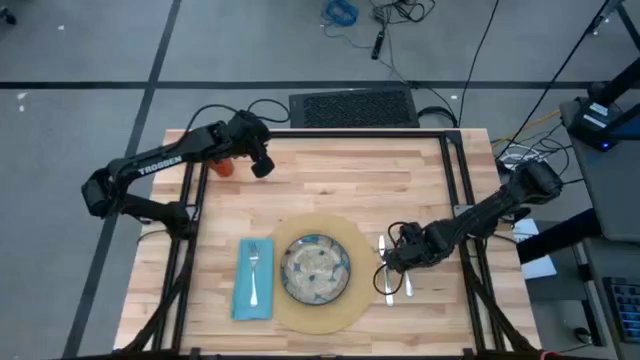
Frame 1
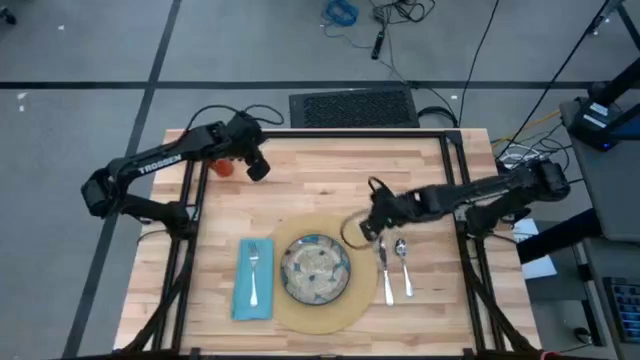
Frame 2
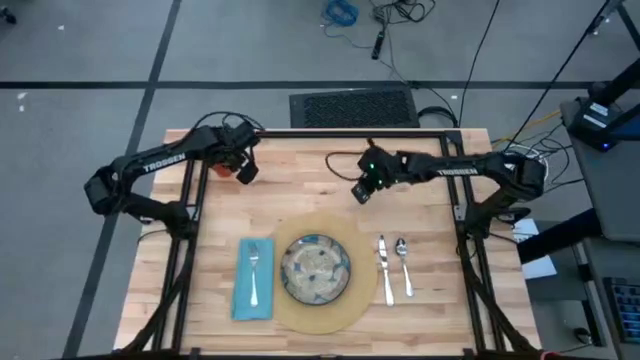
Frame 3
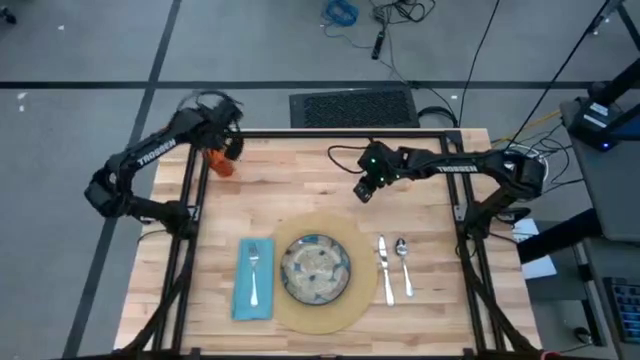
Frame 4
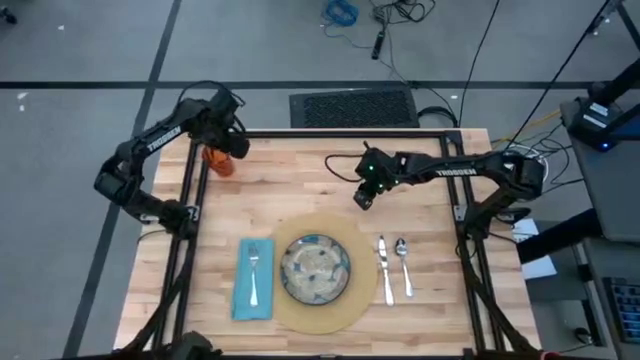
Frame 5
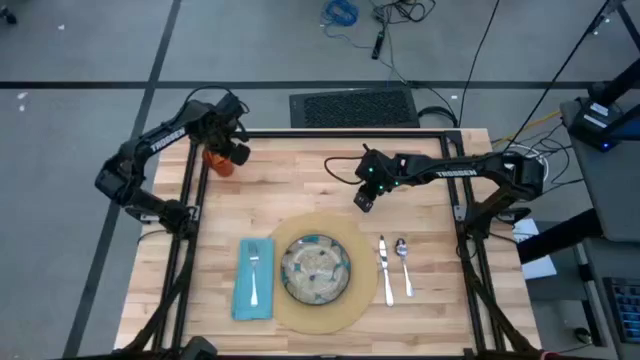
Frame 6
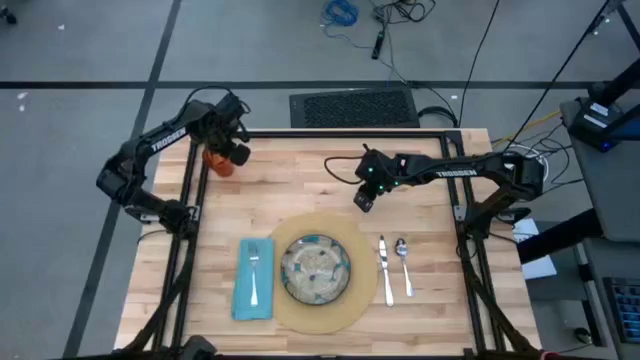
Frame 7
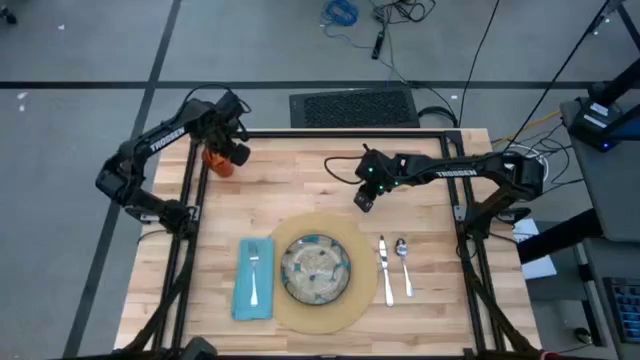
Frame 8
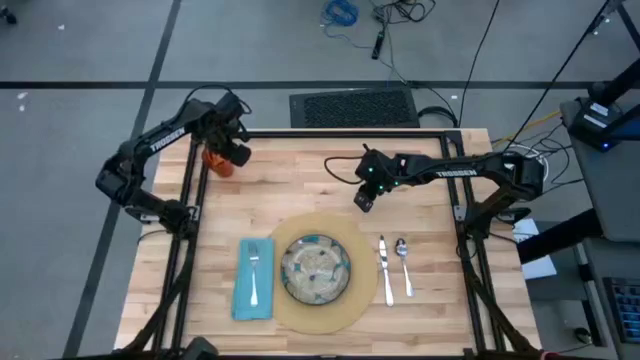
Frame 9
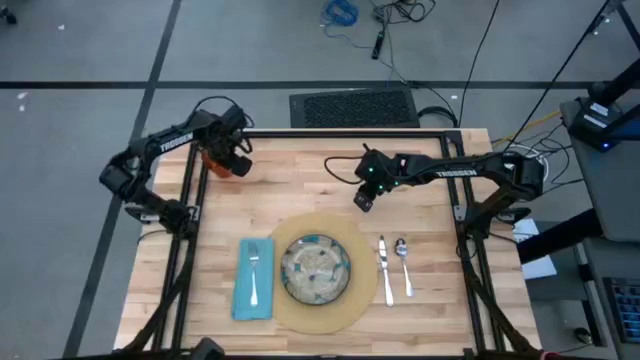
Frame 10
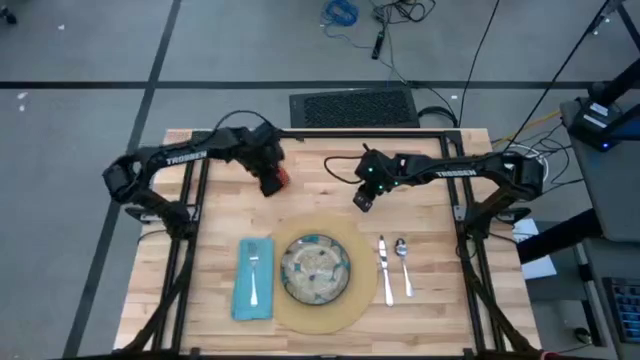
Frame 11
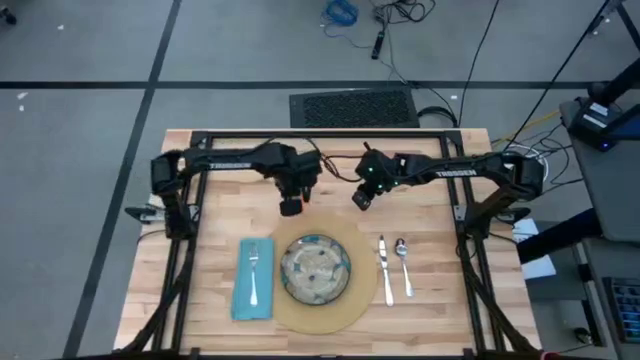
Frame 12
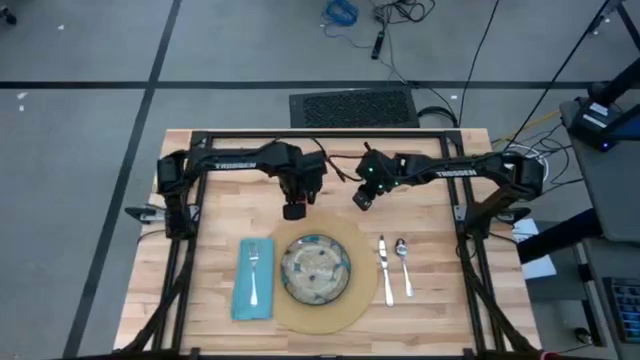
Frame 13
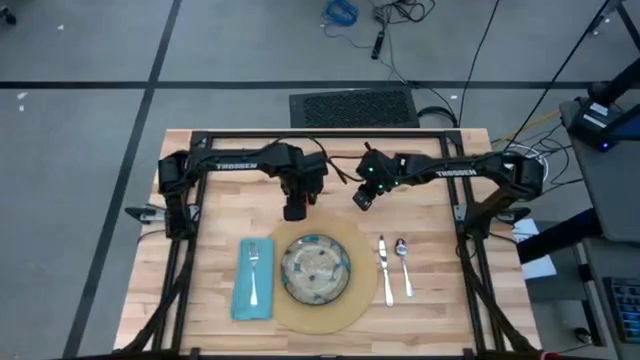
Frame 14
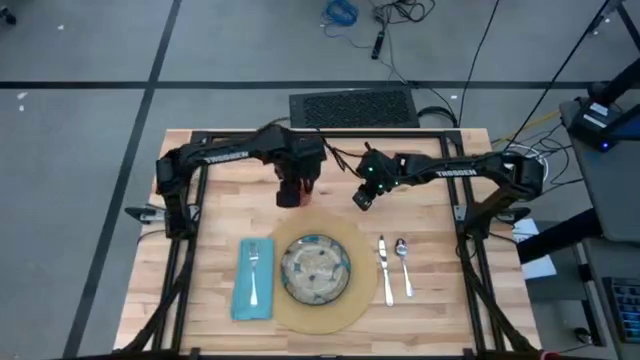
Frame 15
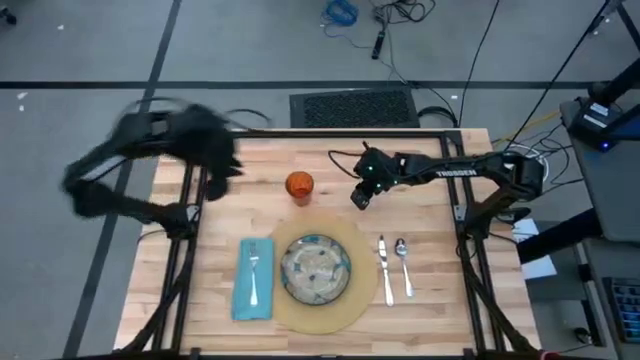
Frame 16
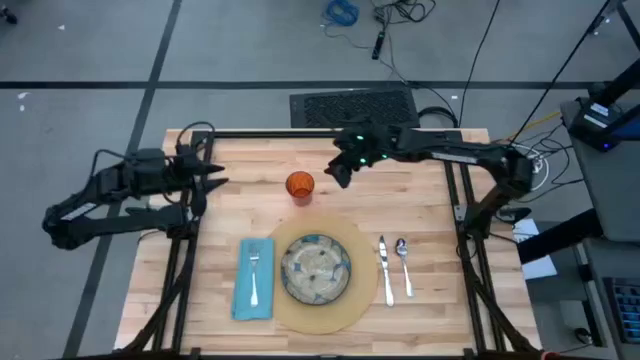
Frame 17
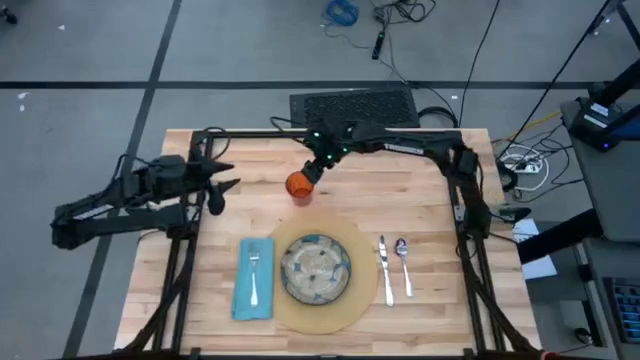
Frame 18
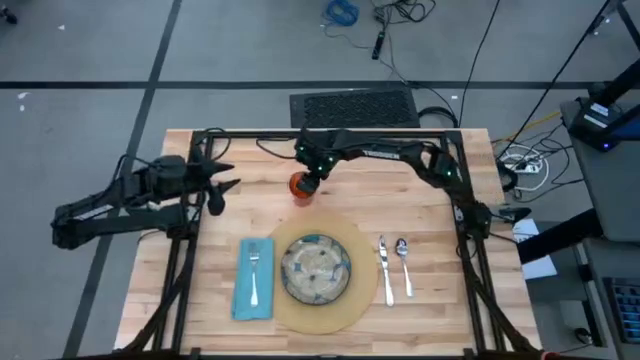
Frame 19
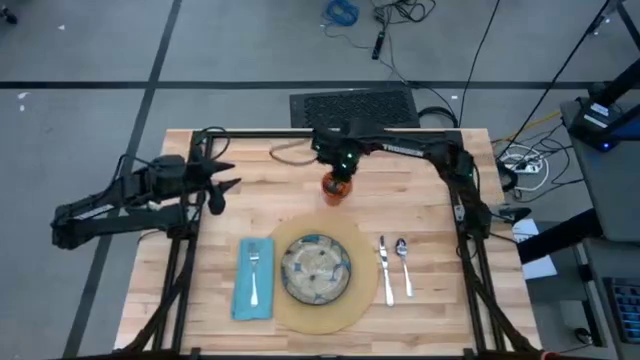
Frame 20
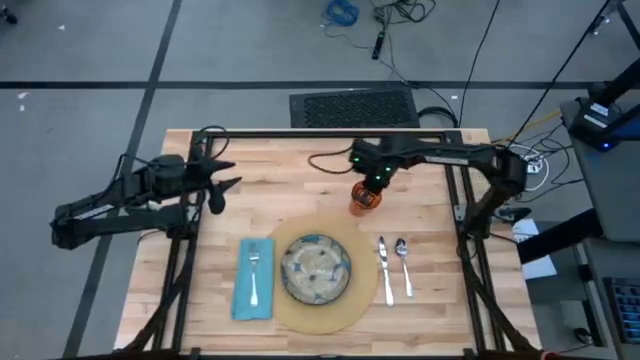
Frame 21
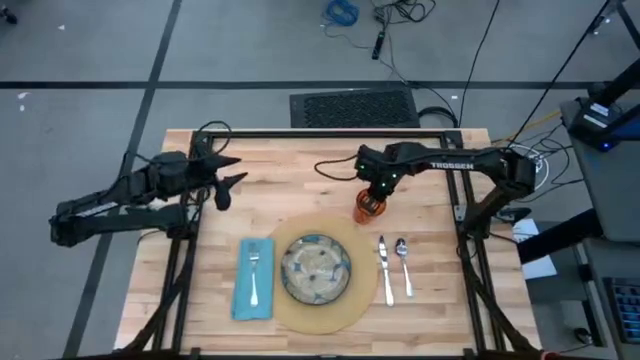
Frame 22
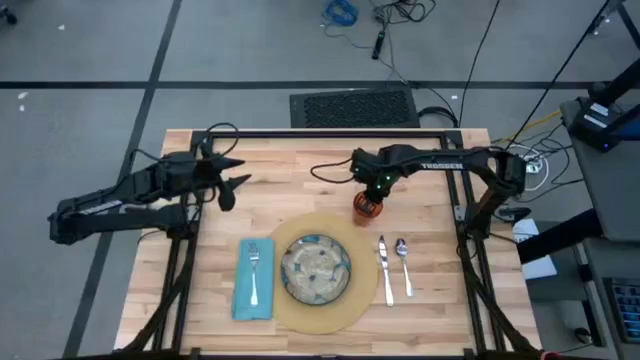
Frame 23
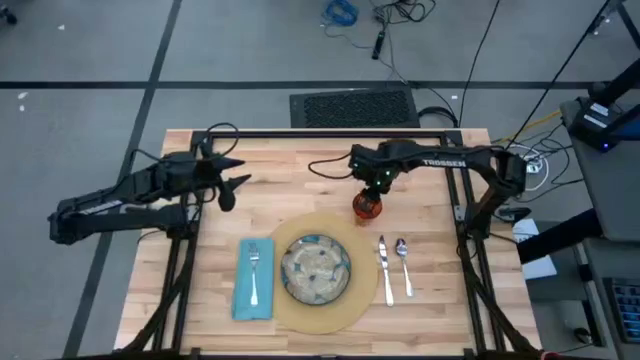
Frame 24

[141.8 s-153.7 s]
Task: Set table place
Put the orange cup on top of the table above the brown mat

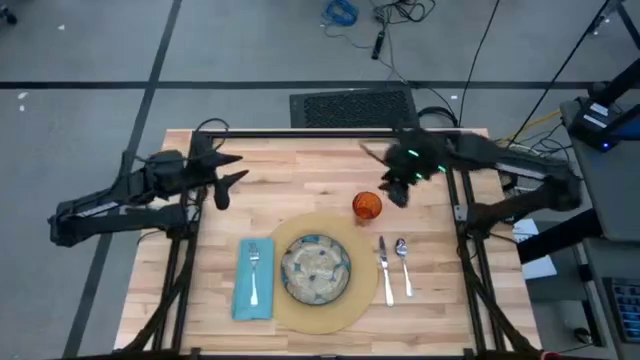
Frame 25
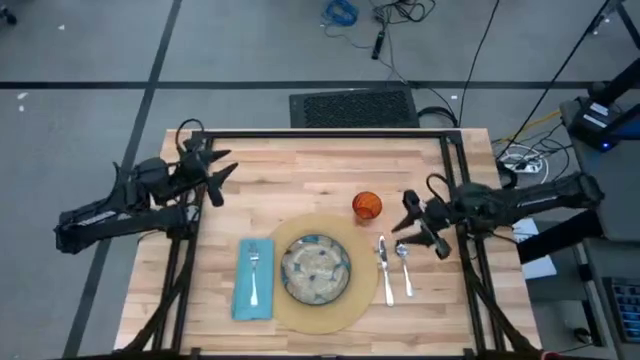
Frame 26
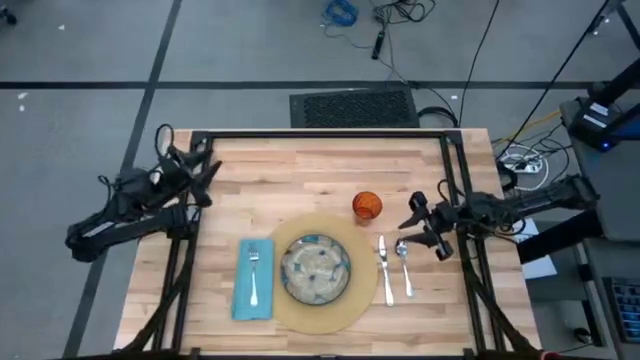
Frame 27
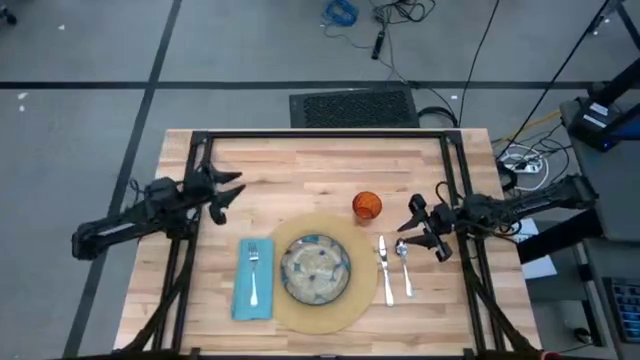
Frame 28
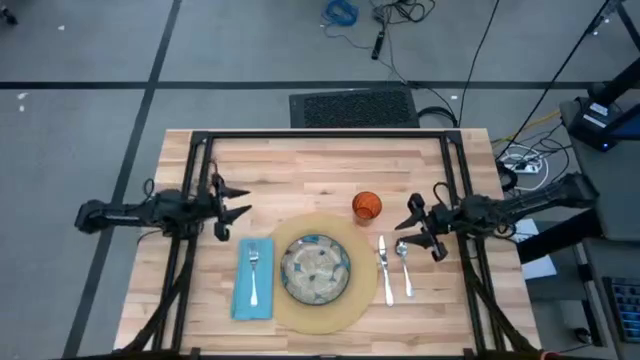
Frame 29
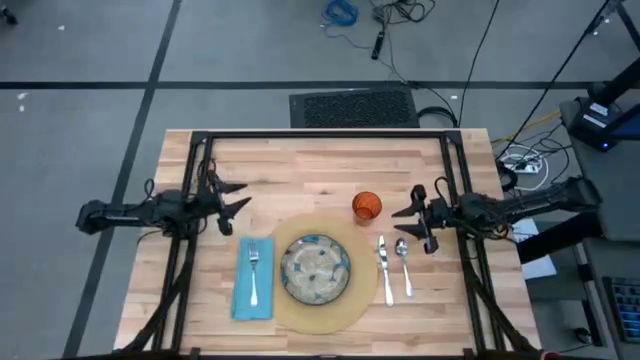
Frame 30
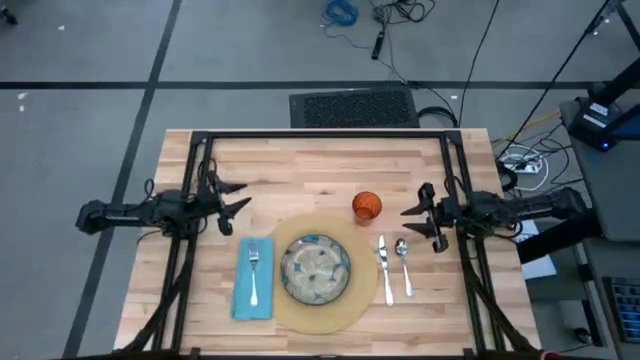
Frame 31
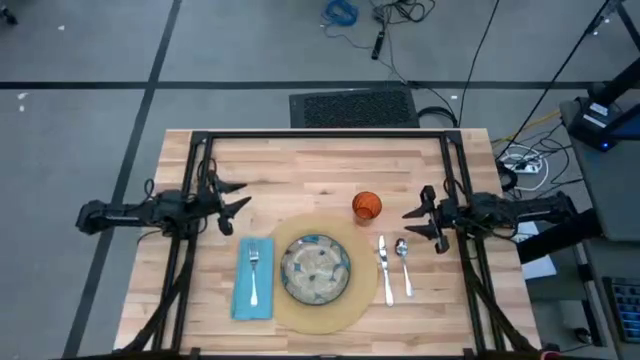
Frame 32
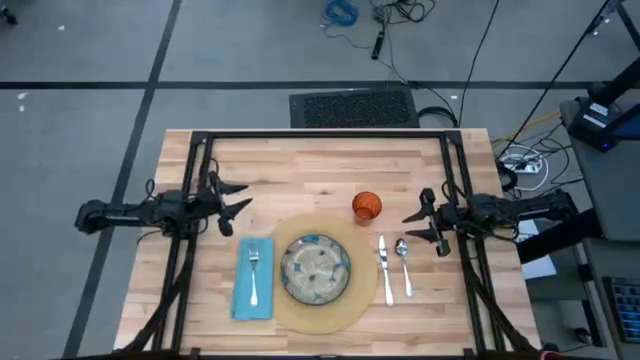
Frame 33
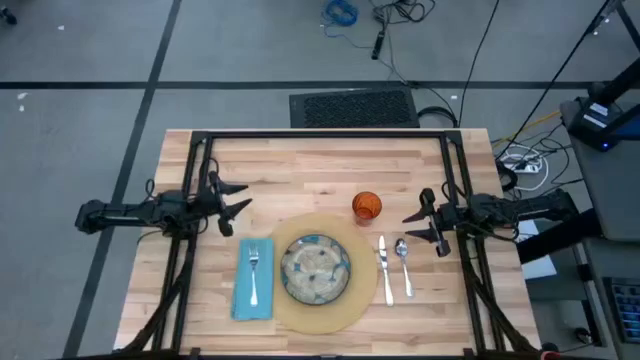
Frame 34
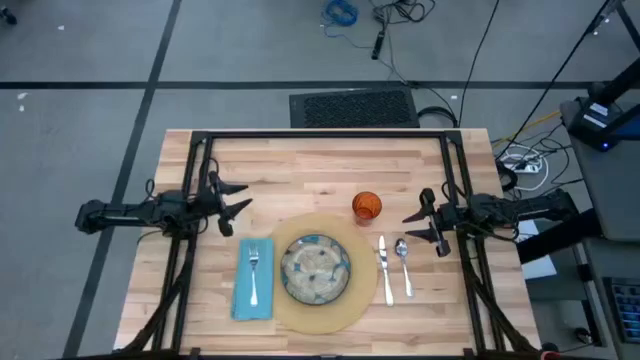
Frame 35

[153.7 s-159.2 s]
Return to Home Position

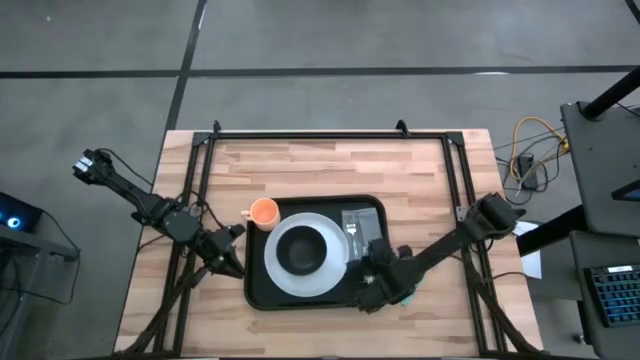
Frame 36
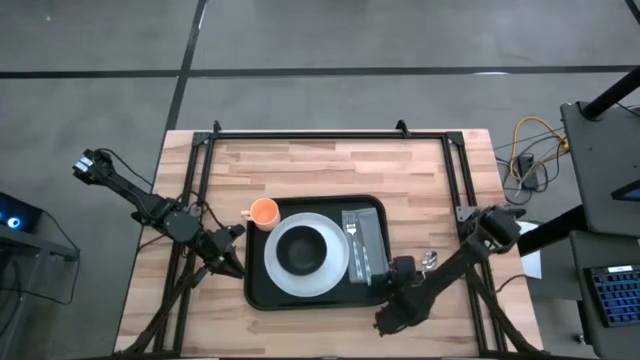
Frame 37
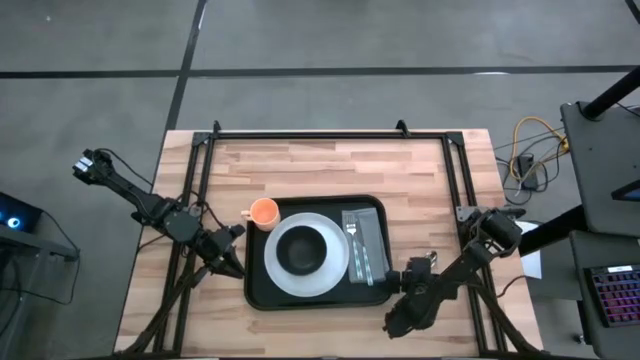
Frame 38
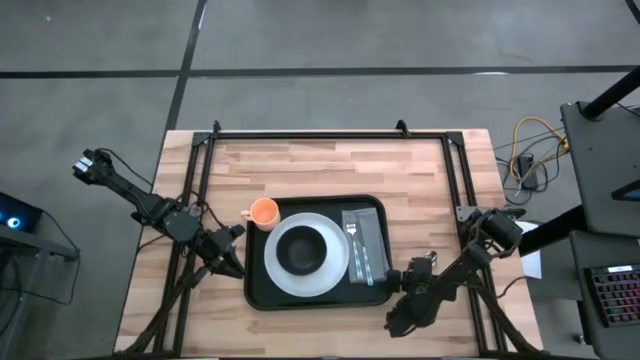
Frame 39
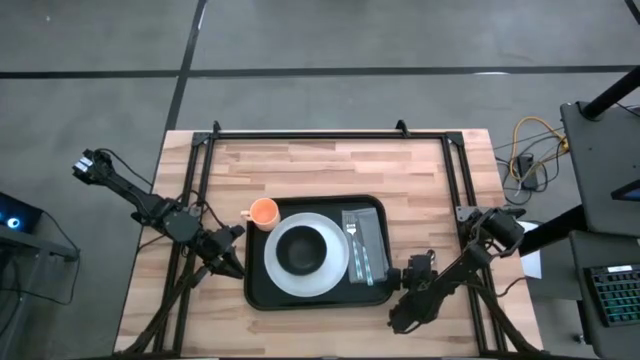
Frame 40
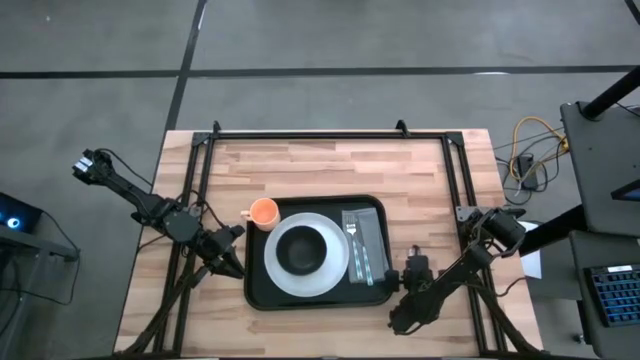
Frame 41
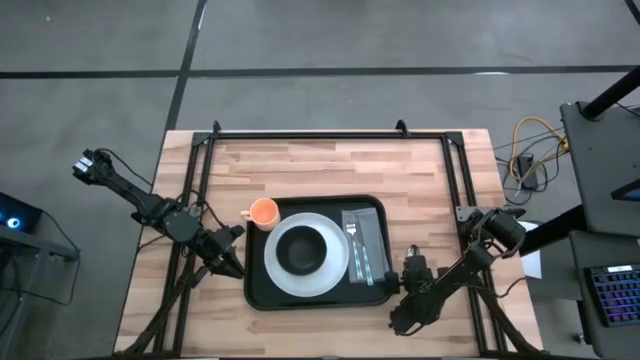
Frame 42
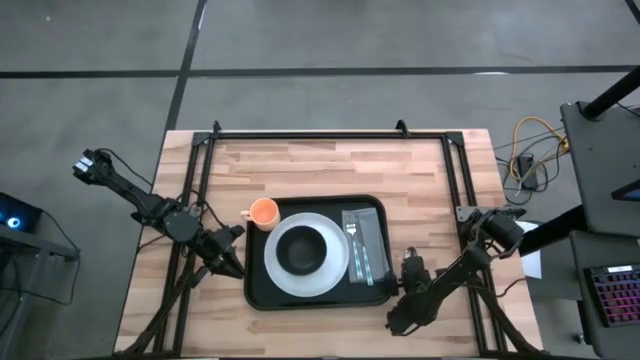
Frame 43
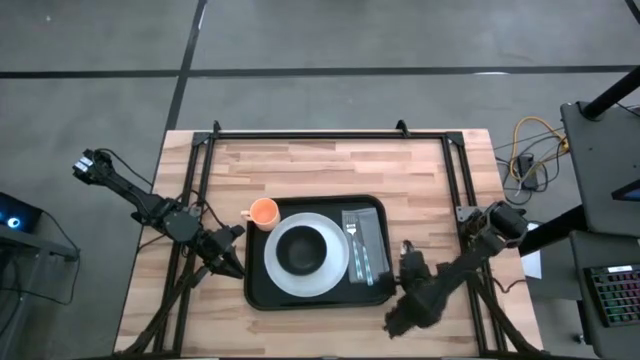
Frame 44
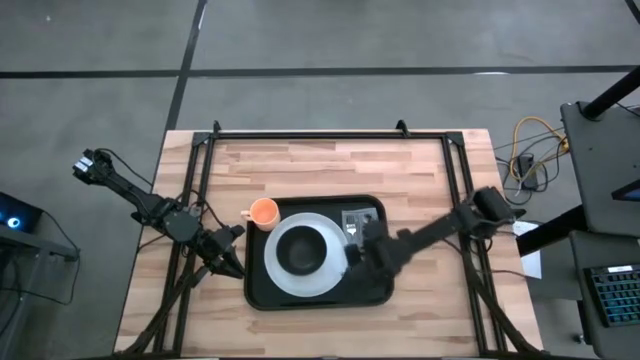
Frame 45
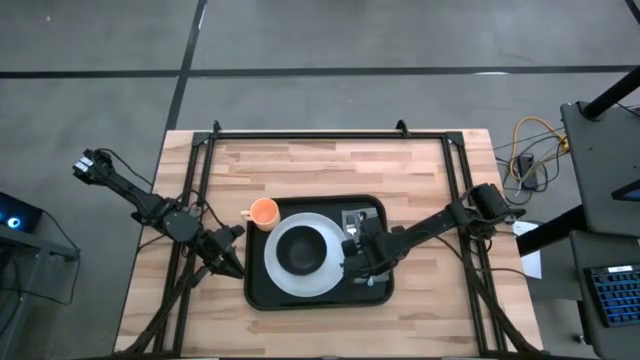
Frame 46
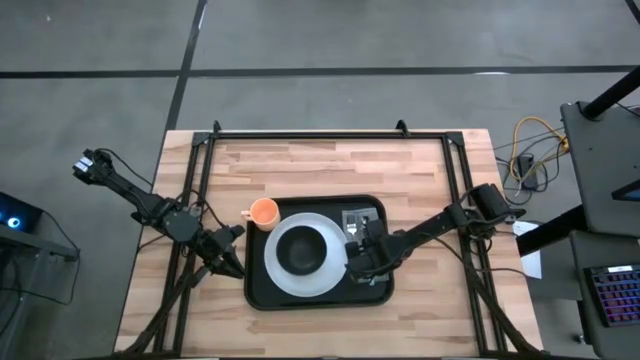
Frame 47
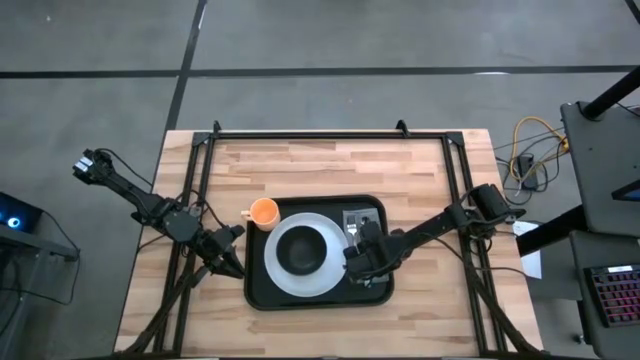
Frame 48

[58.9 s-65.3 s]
Task: Set up tray
Put the green spoon on the gray napkin
